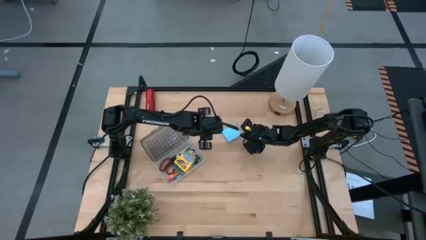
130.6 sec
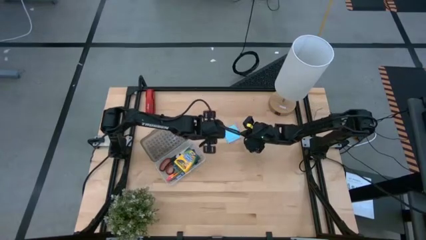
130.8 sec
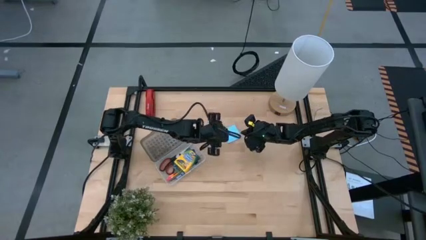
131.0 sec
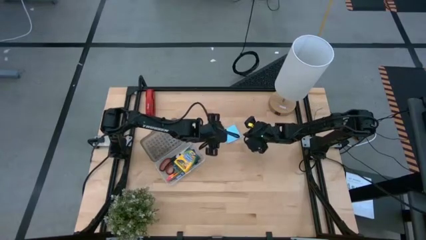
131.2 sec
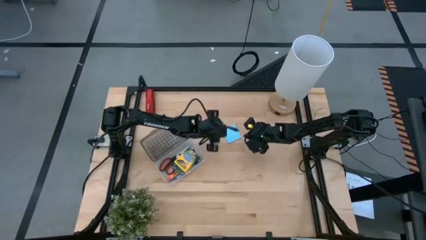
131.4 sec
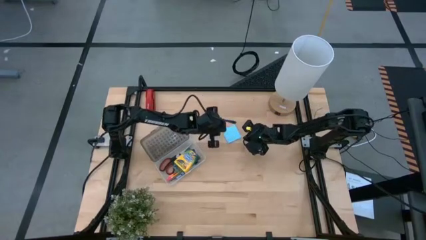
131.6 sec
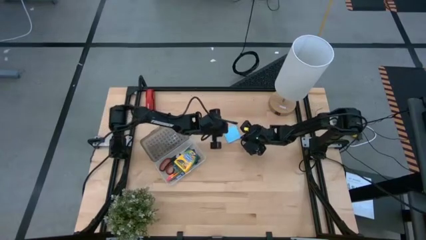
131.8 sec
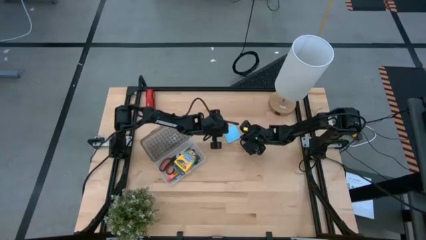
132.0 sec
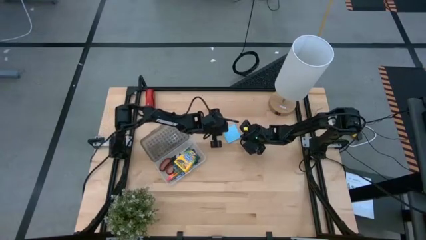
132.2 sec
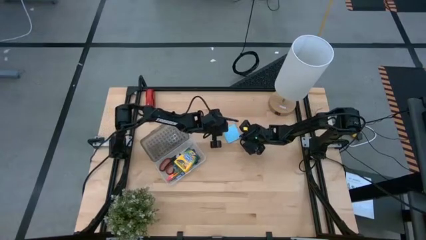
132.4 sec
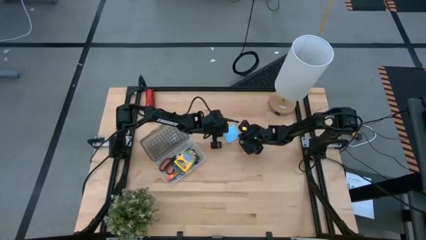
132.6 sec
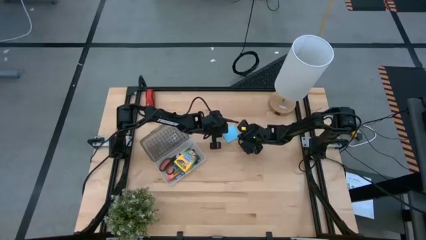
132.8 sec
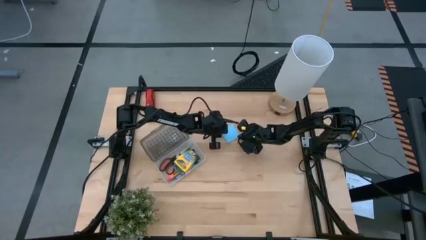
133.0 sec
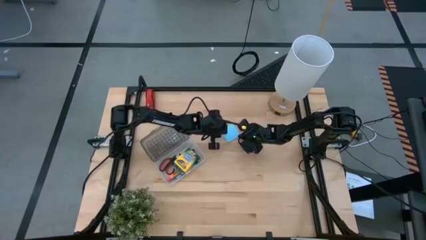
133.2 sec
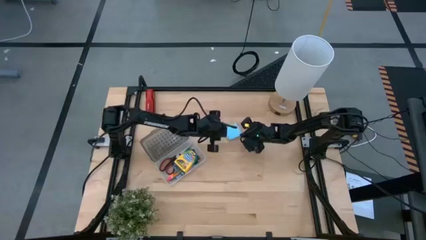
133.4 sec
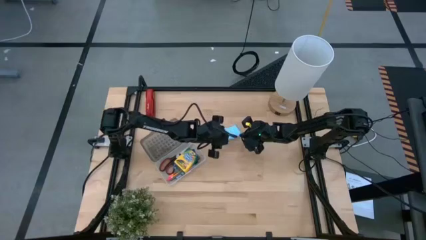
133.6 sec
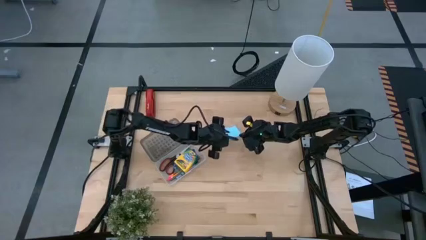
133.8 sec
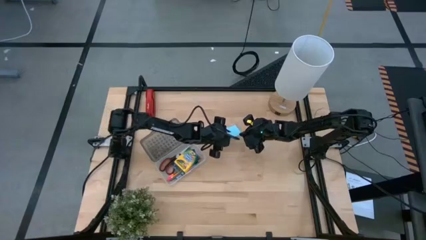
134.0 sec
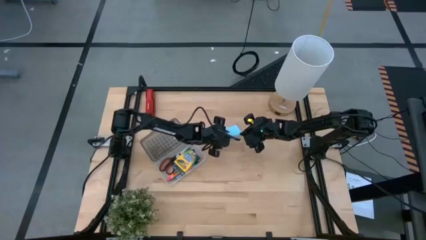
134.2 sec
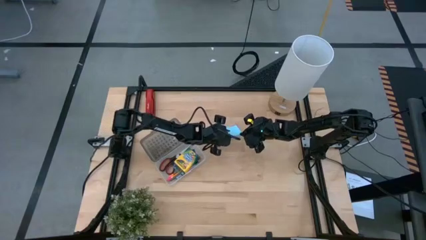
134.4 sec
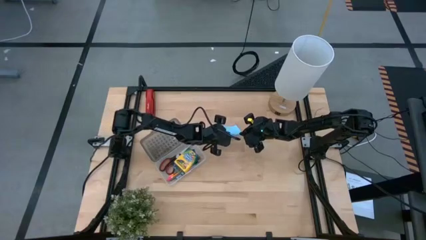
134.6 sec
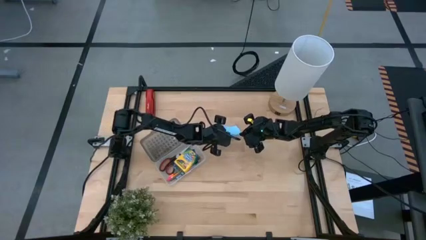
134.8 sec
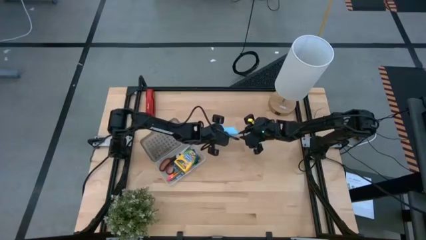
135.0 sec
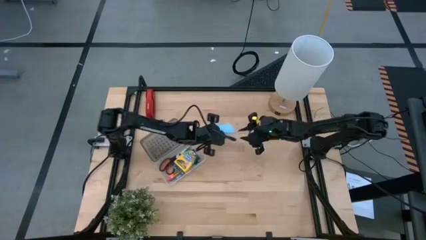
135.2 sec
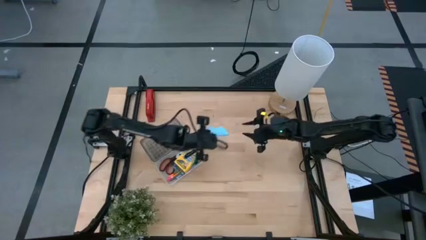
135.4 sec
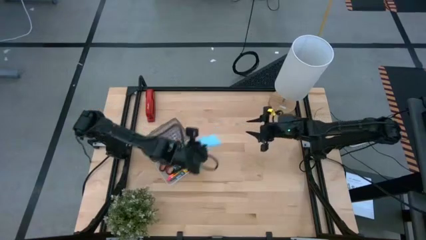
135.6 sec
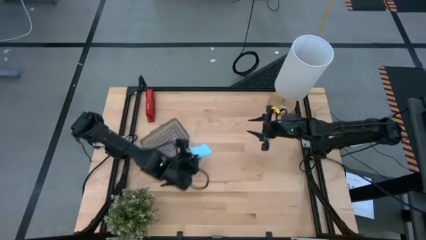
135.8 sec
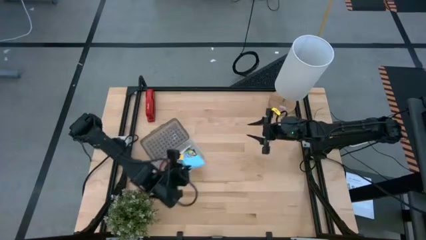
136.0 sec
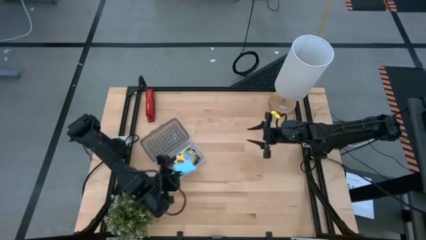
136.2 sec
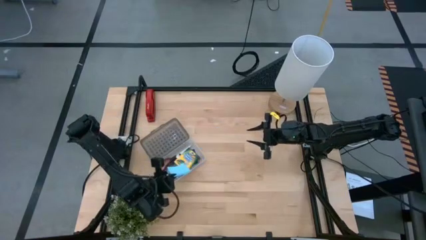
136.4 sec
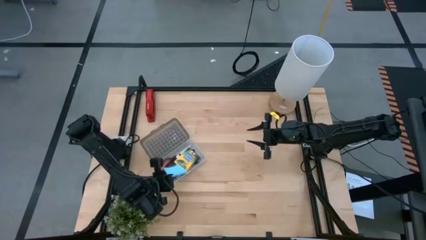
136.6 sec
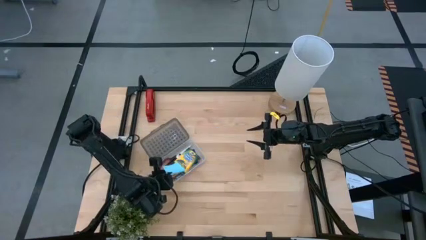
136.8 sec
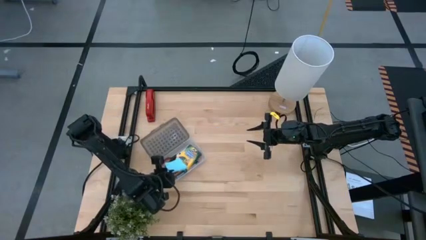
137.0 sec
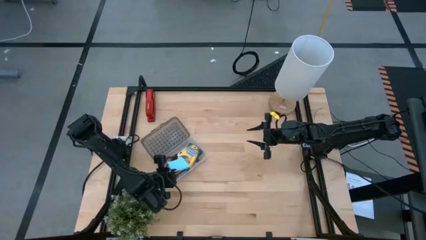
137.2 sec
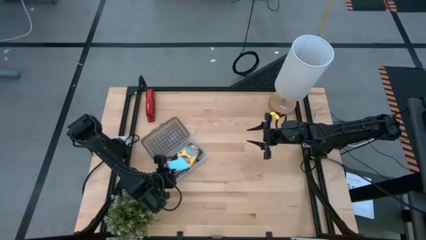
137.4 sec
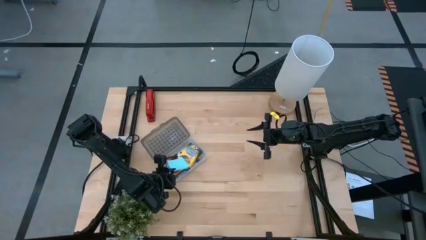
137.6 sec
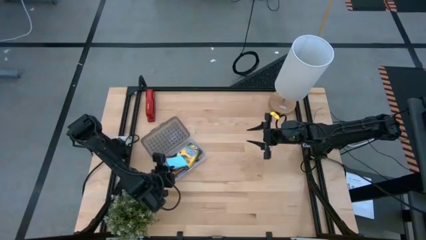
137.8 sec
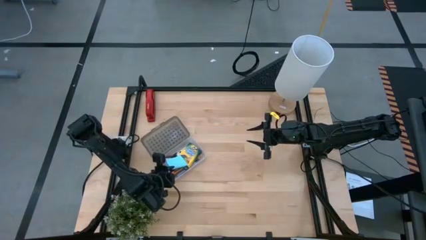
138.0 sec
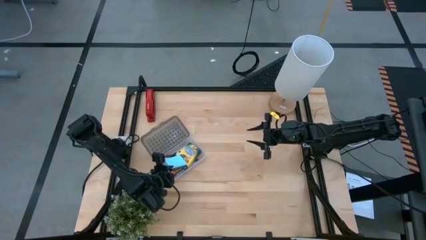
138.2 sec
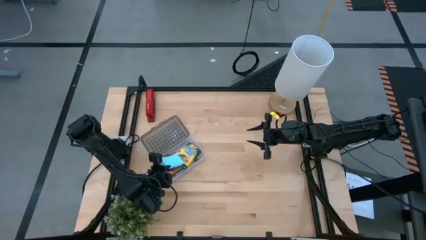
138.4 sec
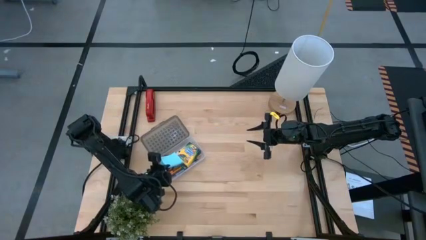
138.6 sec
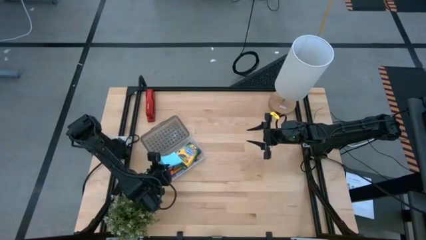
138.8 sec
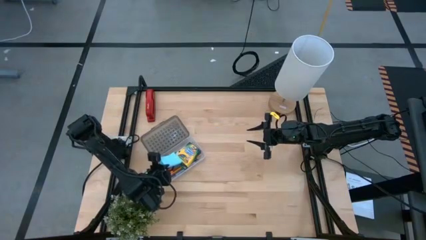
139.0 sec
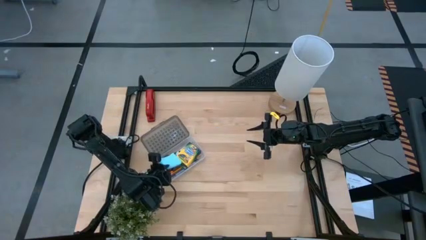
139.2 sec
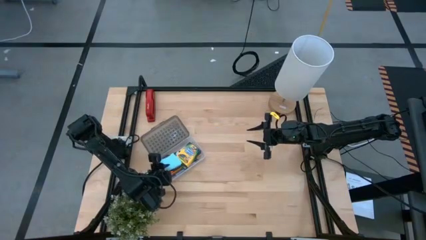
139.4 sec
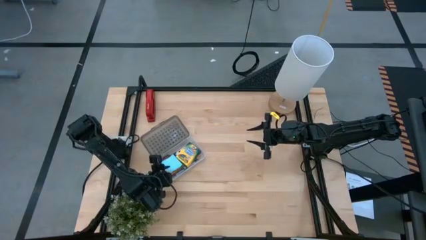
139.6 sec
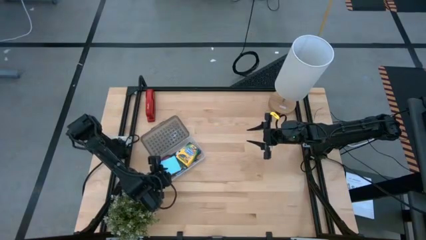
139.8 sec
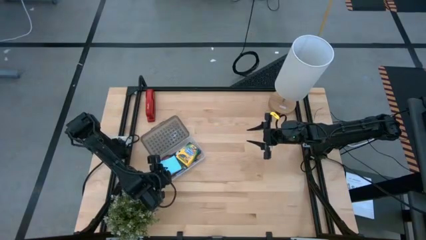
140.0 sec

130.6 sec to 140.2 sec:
Task: Pack school essentials
Put the blue sticky notes into the supply box

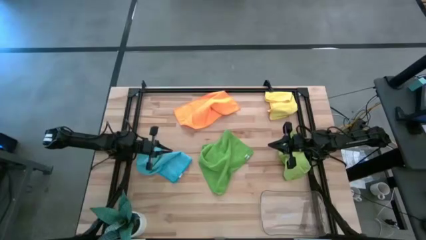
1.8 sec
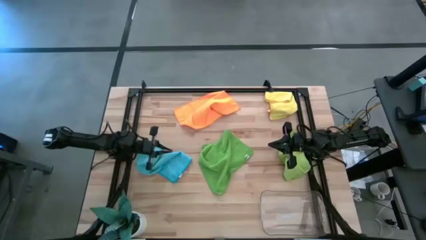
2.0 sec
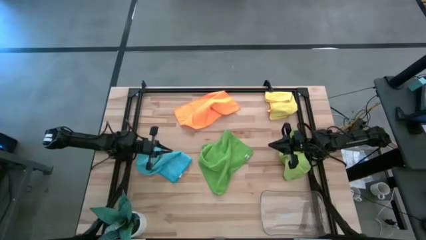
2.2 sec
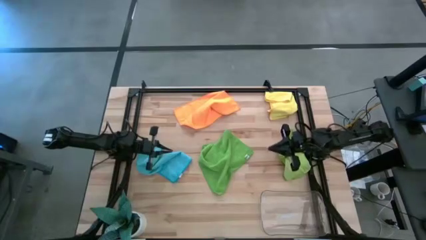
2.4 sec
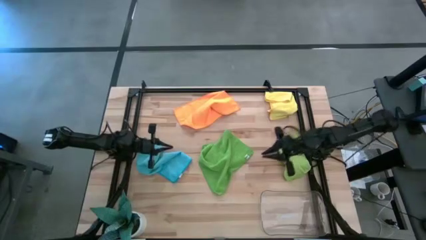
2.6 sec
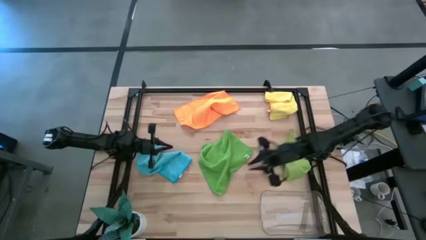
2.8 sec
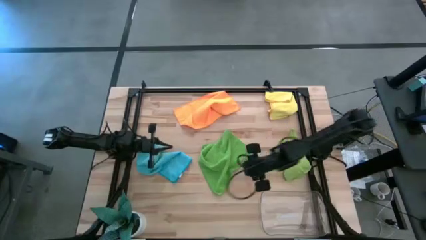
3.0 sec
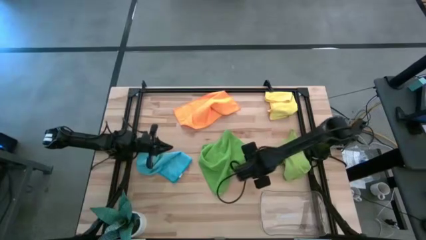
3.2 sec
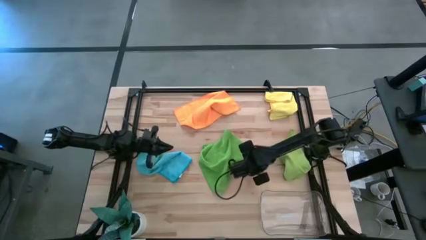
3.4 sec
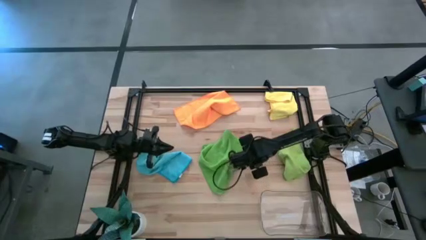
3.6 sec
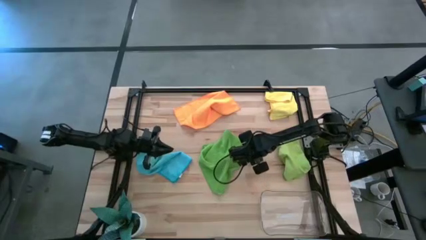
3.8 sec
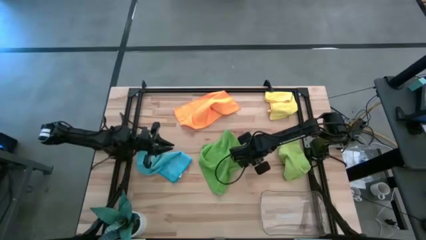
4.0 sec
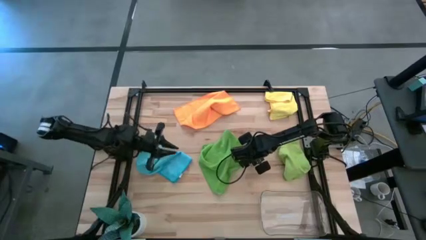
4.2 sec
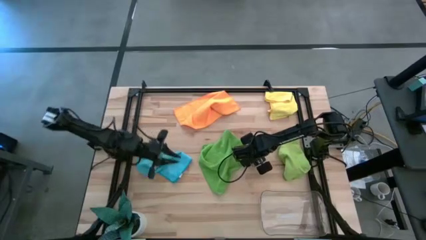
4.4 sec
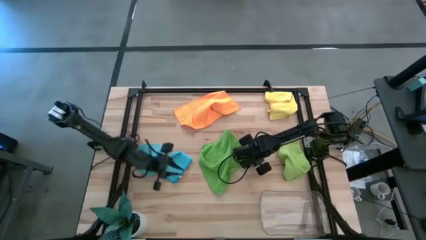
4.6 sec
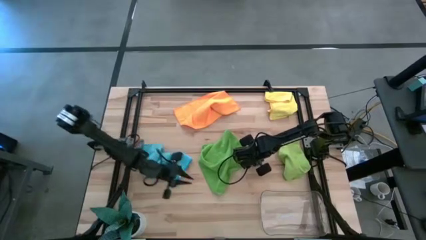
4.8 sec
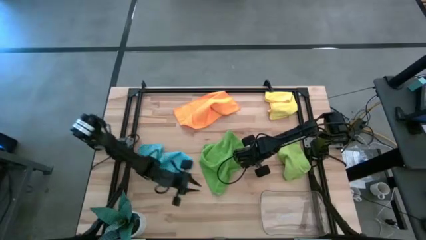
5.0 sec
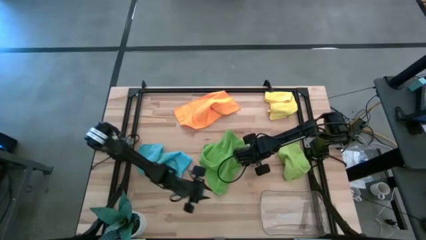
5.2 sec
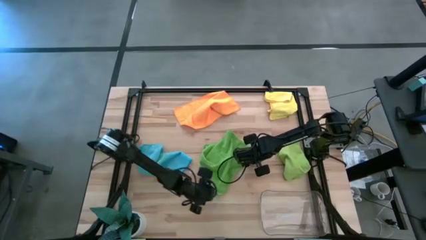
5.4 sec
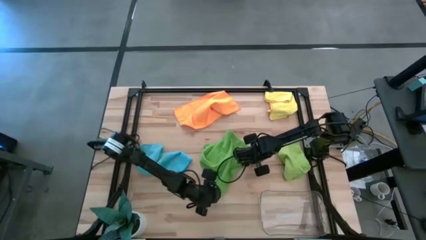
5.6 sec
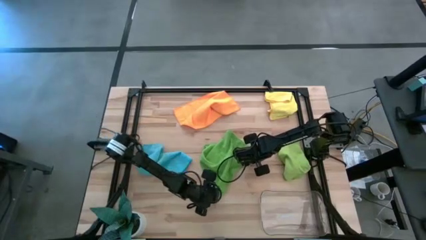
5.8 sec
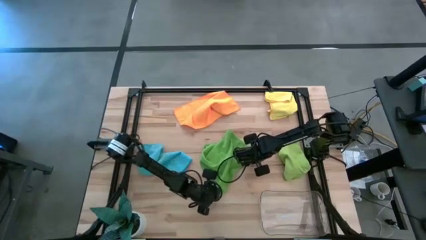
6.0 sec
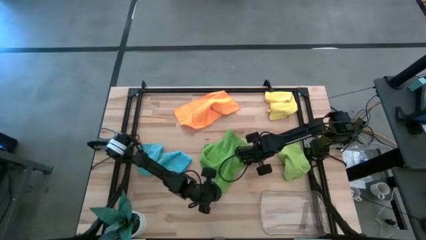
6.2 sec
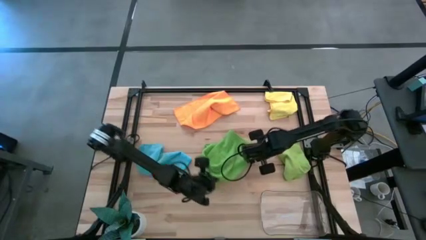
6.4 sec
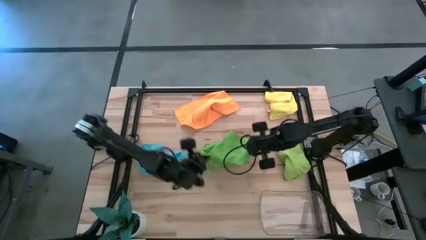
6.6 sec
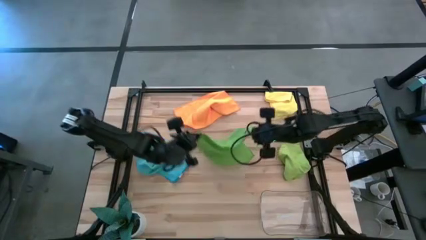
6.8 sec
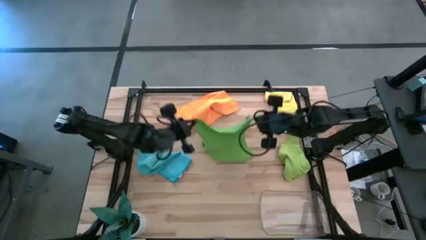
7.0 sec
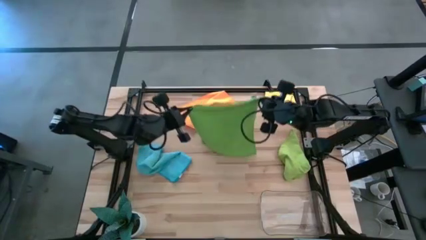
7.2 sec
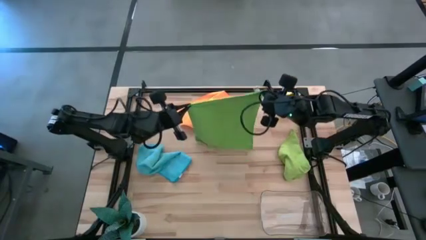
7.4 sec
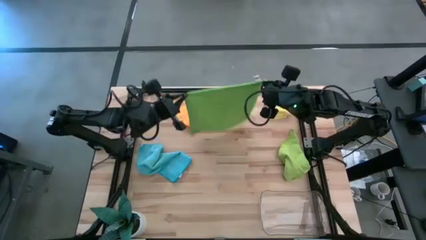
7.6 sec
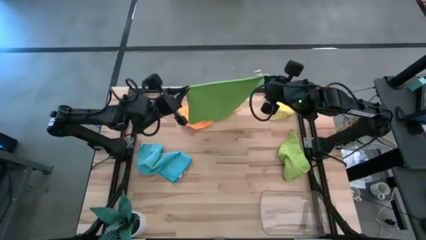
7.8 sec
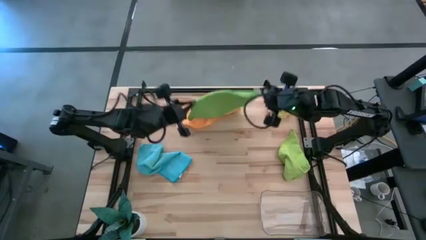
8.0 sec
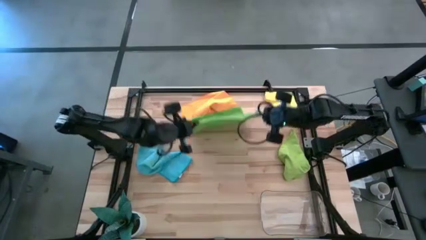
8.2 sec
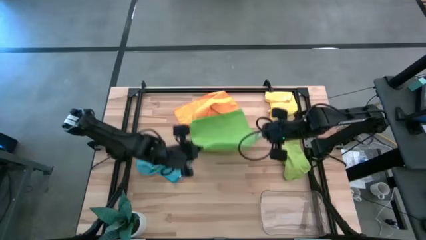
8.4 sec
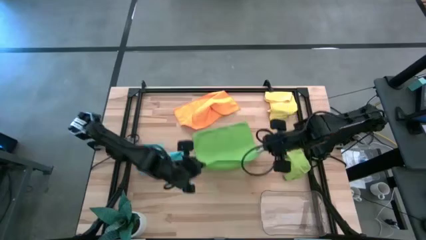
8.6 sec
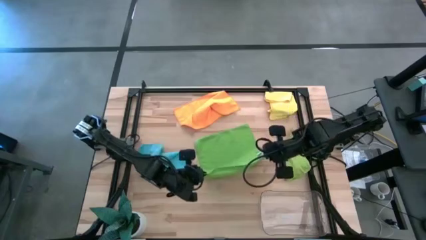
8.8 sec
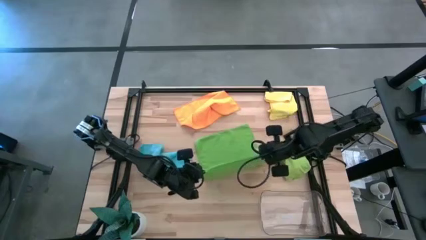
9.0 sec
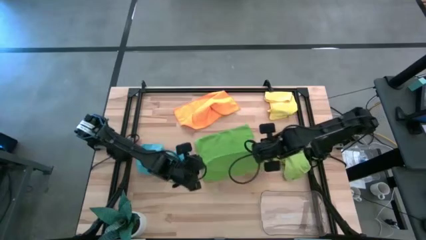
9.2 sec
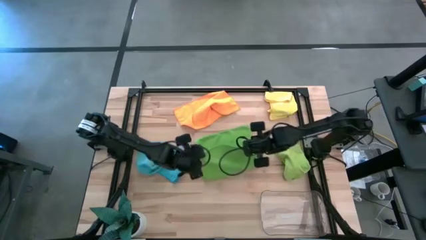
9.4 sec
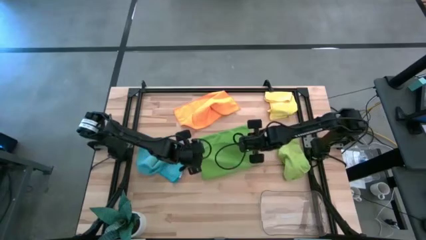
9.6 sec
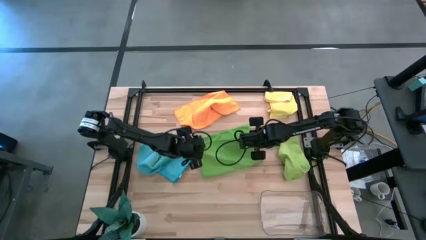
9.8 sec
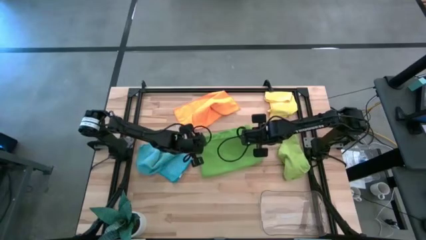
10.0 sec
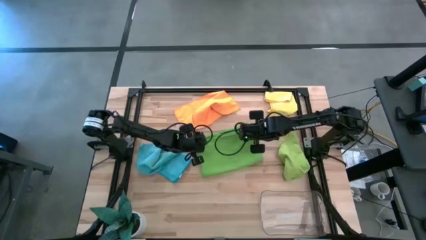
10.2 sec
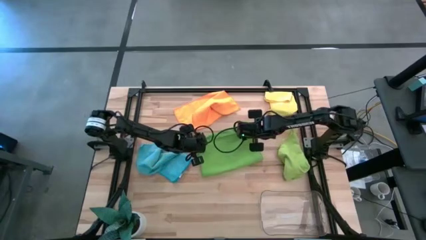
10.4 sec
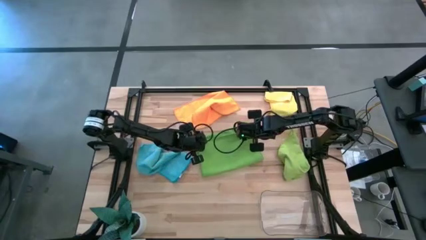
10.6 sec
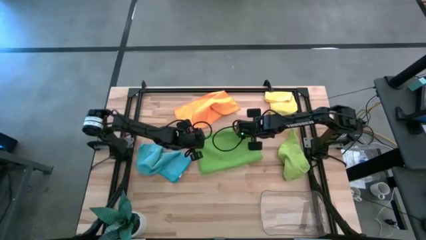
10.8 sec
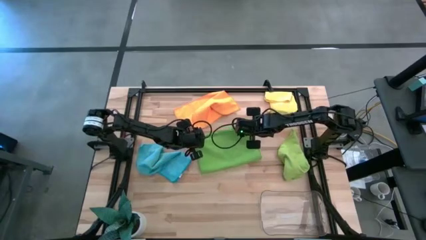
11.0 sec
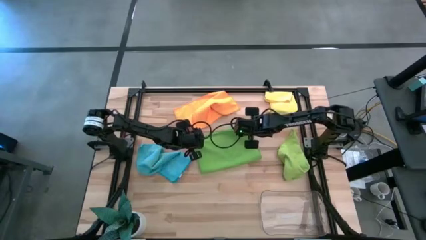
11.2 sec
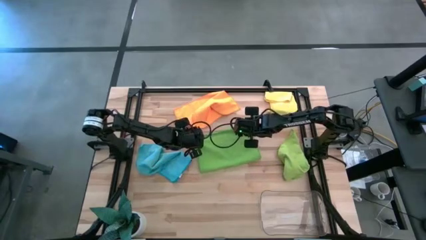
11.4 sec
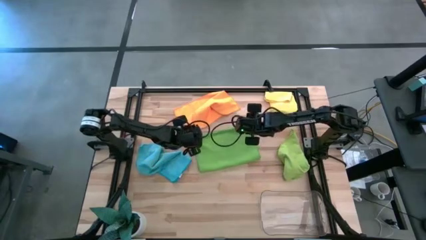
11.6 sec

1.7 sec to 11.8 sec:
Task: Fold microfiber towels
Fold the green microfiber towel
